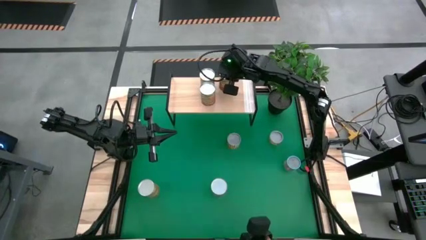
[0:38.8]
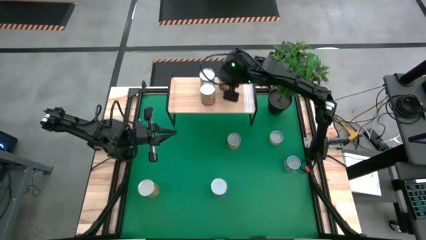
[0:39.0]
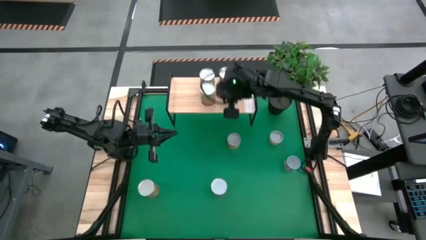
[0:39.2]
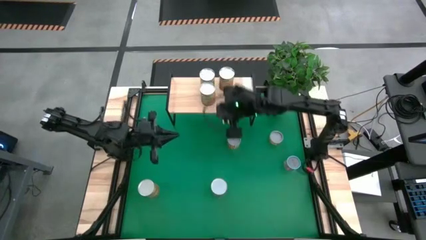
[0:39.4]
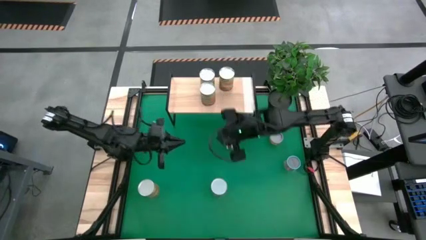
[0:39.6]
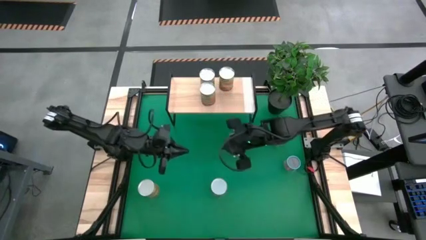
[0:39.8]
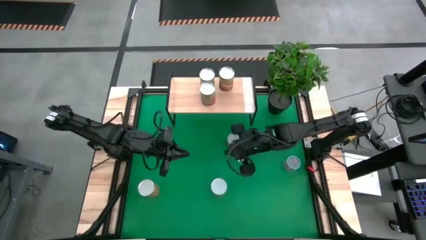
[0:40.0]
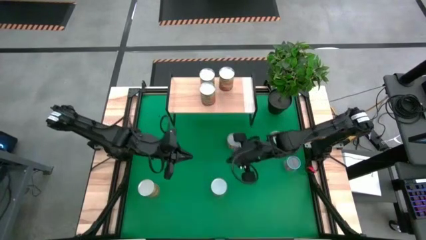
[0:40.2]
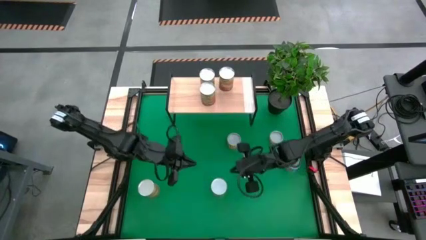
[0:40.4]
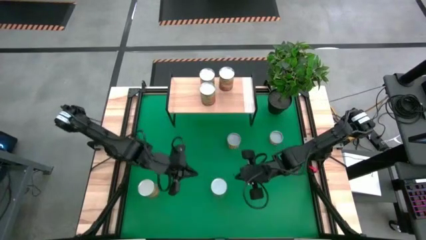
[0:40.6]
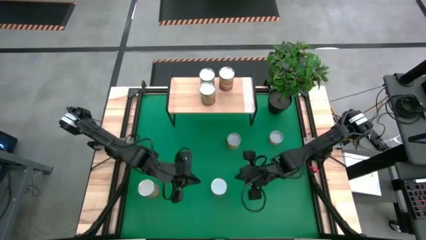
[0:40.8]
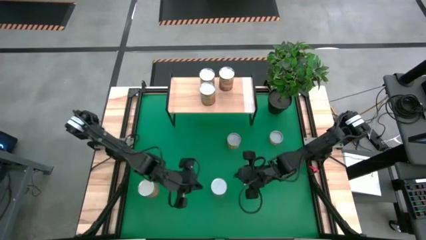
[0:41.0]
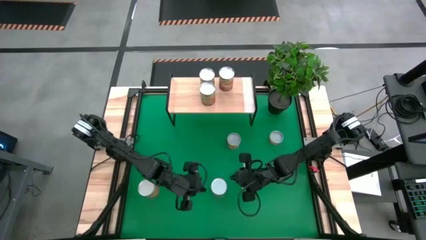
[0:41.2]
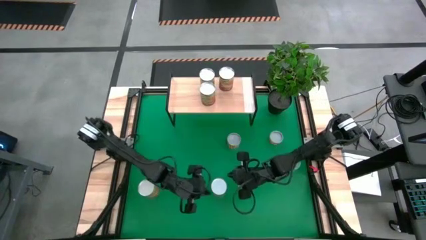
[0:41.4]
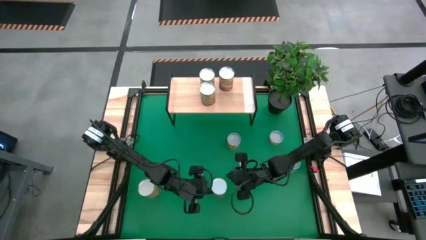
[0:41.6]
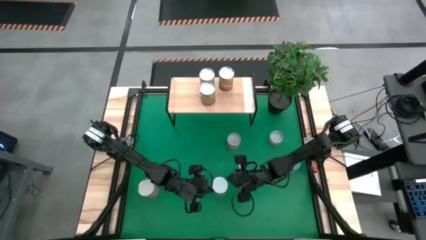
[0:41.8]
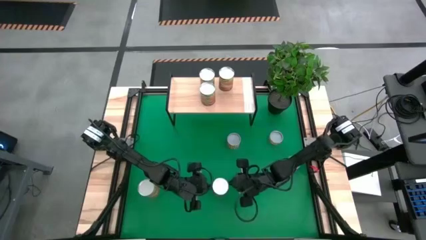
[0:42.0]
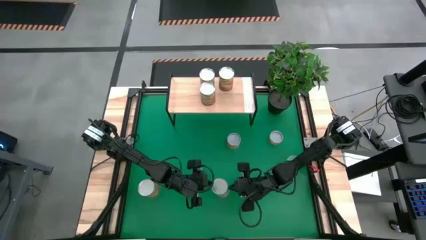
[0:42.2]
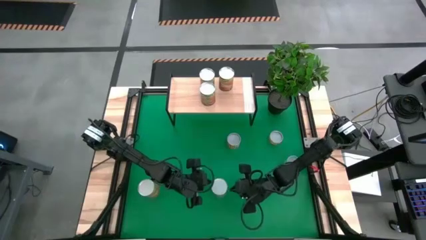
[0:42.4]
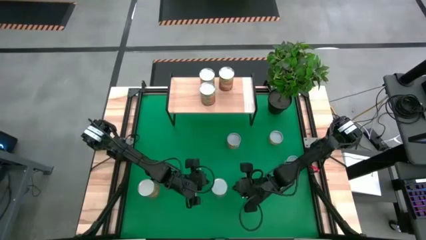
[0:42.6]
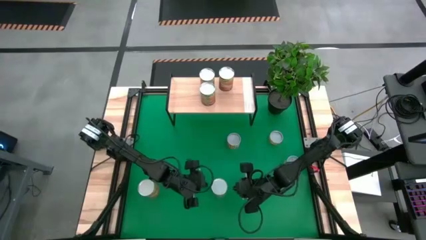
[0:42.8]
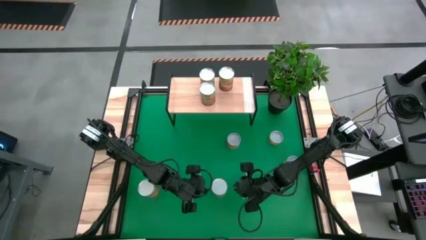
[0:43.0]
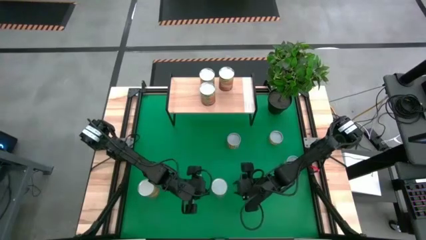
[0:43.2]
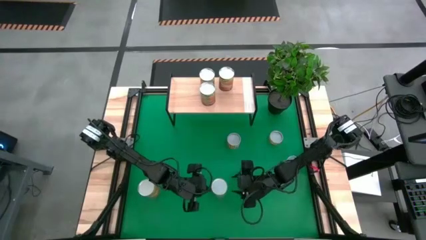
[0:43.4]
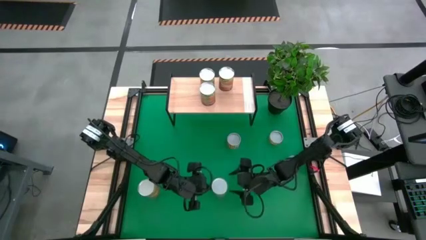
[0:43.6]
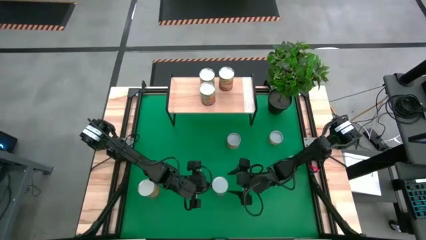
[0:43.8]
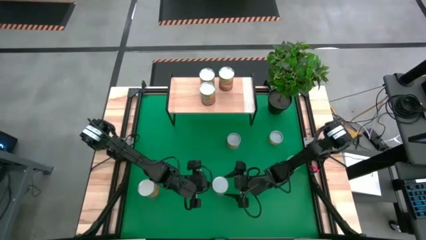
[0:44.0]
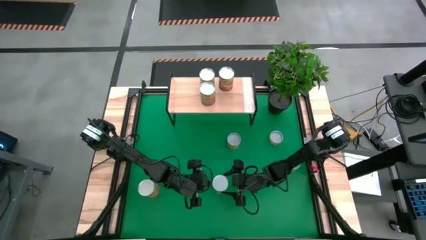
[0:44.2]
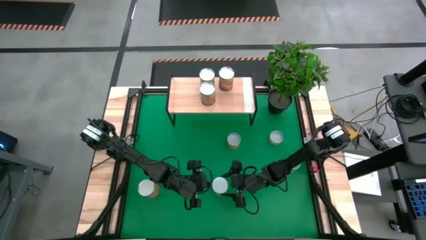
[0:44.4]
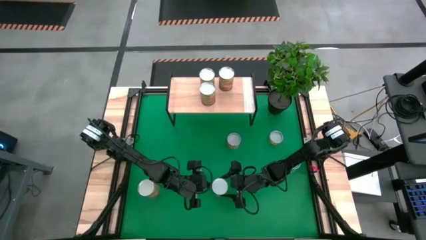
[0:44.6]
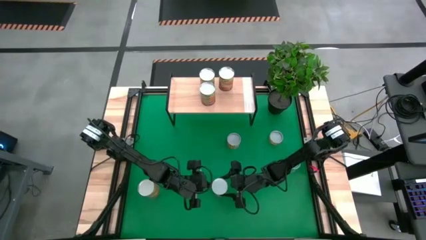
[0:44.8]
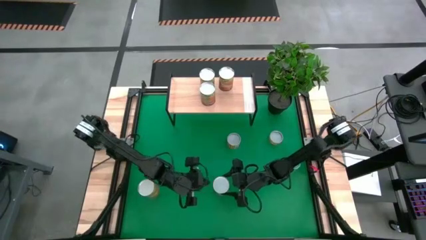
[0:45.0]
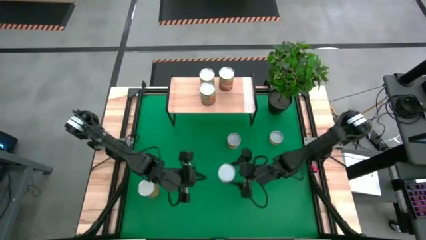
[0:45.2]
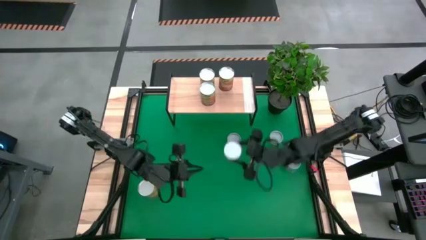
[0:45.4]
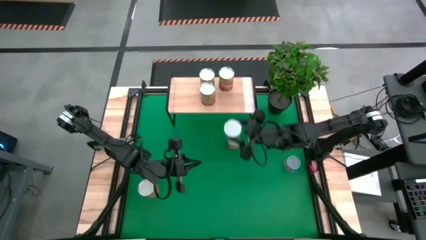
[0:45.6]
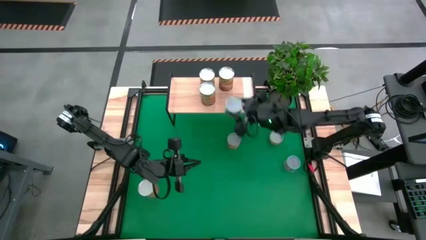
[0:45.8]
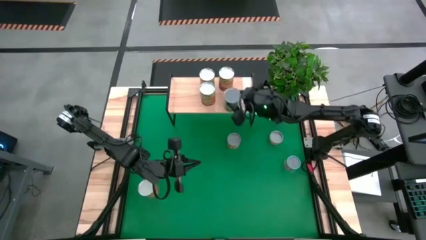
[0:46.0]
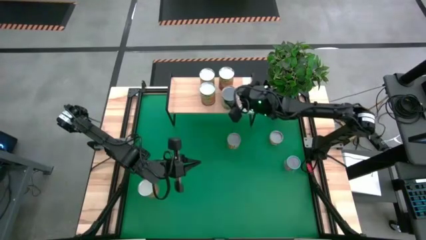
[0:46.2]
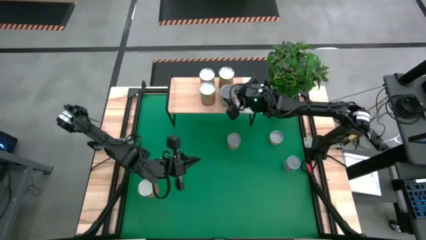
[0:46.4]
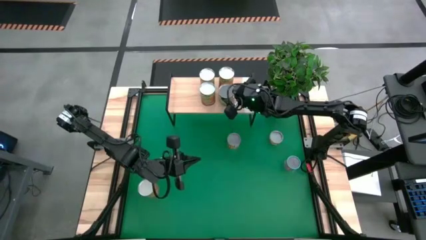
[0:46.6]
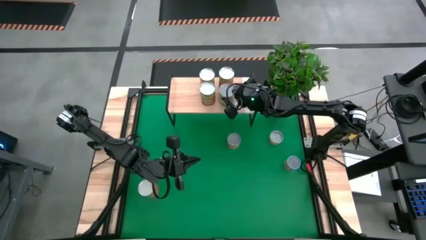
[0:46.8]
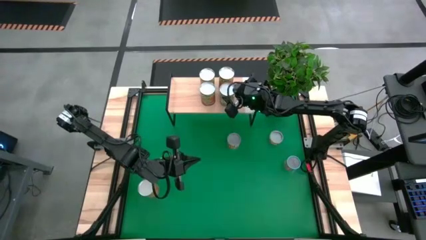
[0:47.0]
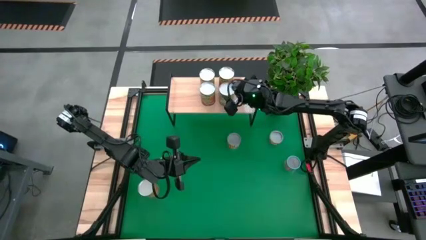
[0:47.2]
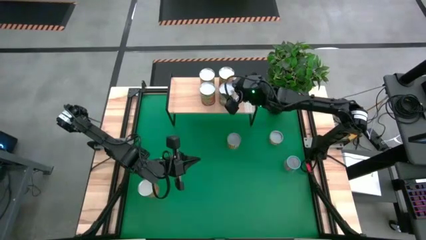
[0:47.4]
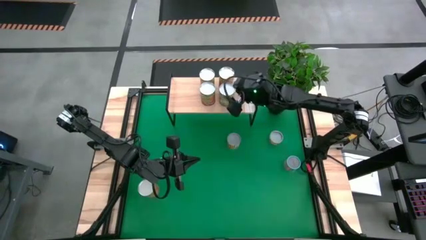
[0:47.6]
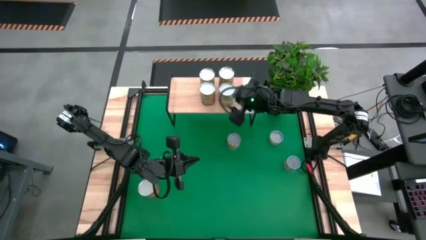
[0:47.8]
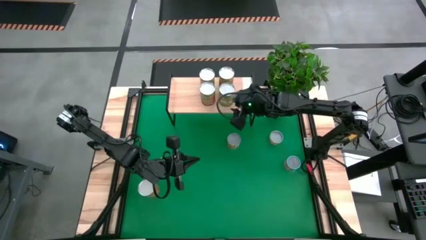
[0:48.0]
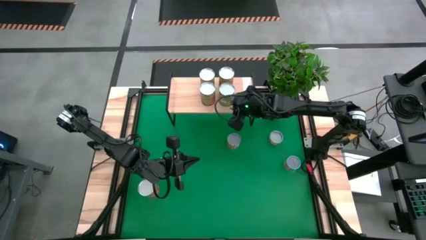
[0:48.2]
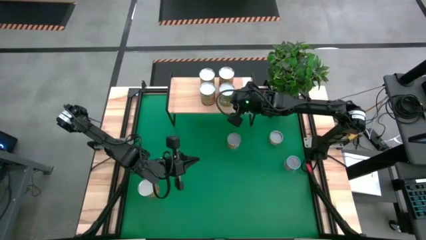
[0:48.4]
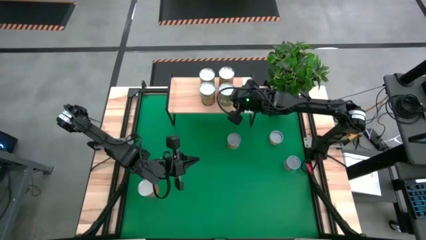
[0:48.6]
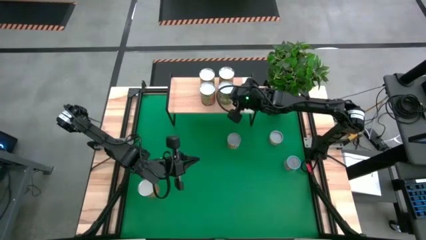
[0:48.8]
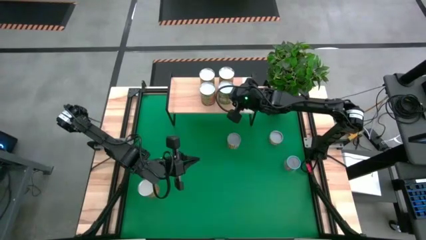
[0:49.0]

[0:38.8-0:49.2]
Task: Pick and place cans onto a shelf
Put the canned pears on the shelf

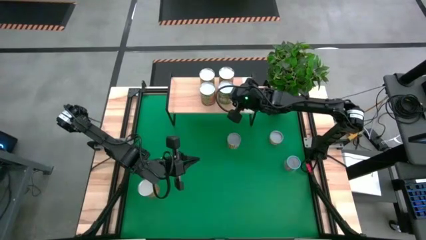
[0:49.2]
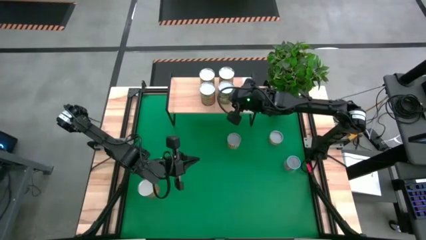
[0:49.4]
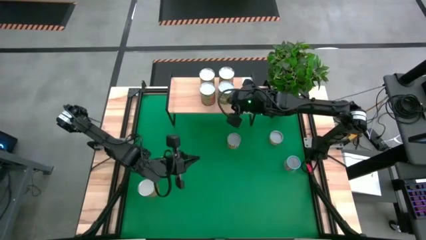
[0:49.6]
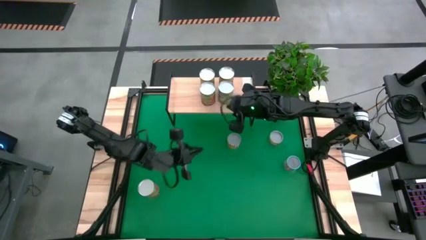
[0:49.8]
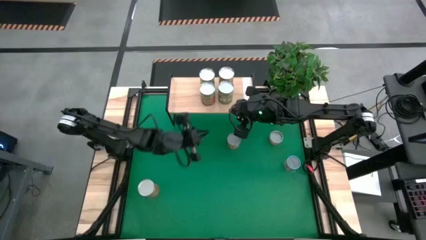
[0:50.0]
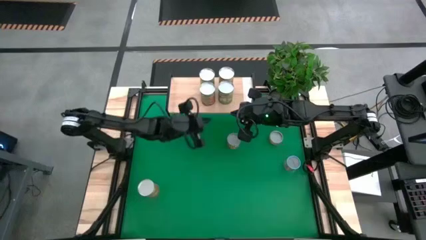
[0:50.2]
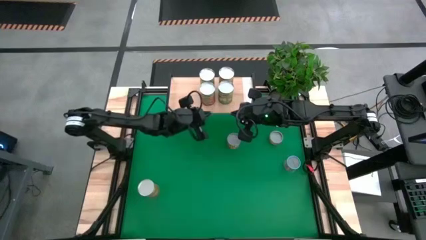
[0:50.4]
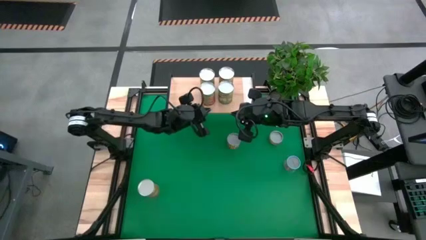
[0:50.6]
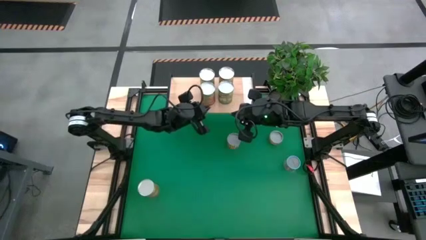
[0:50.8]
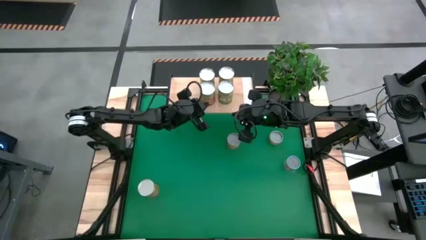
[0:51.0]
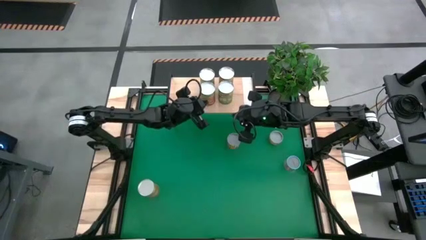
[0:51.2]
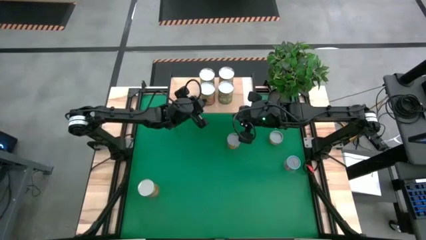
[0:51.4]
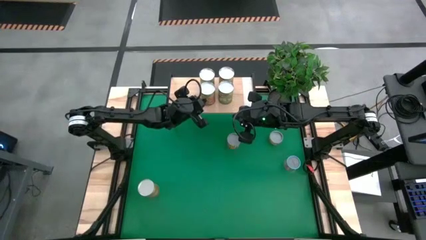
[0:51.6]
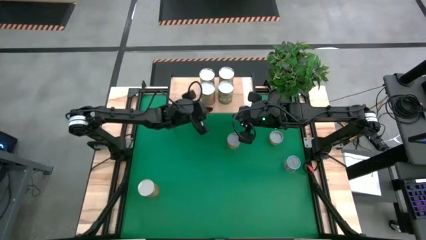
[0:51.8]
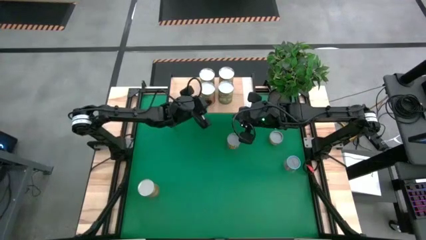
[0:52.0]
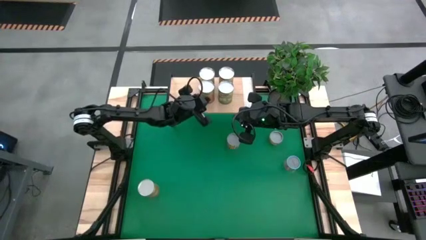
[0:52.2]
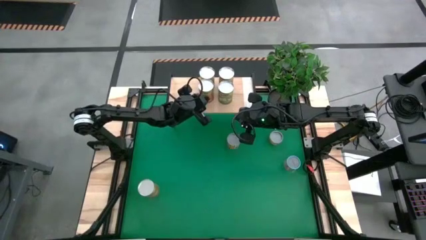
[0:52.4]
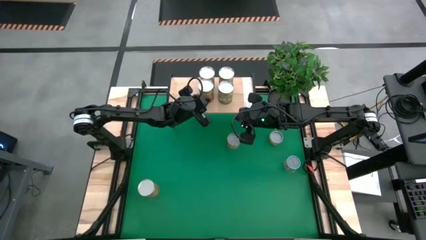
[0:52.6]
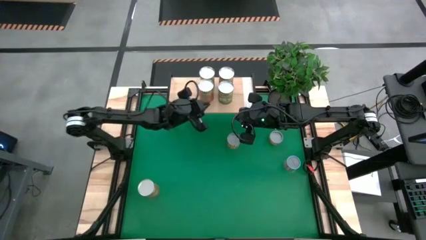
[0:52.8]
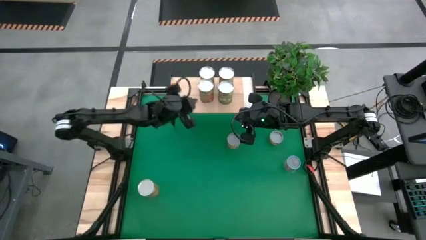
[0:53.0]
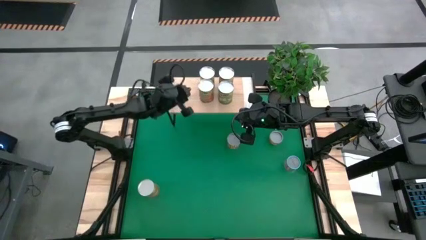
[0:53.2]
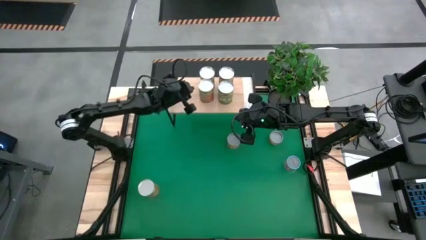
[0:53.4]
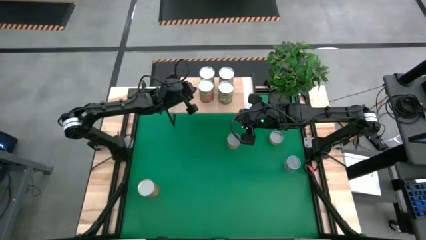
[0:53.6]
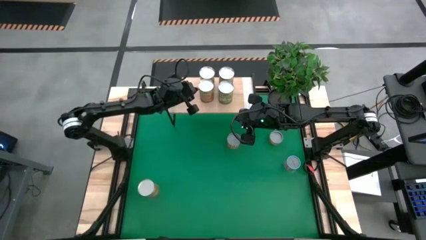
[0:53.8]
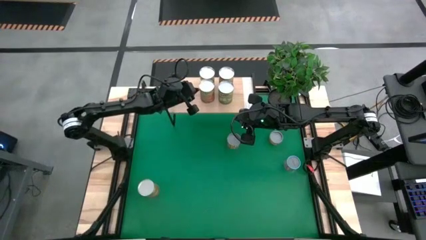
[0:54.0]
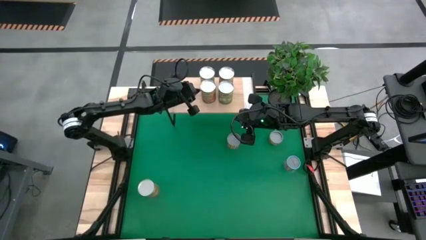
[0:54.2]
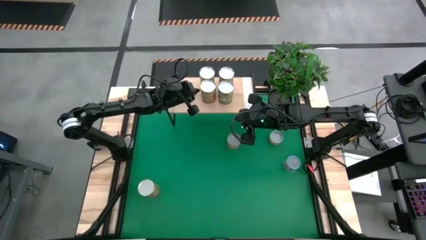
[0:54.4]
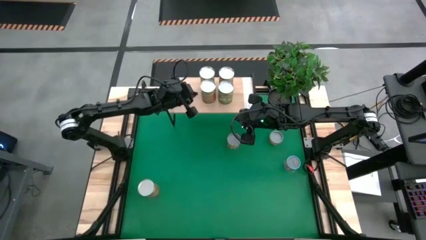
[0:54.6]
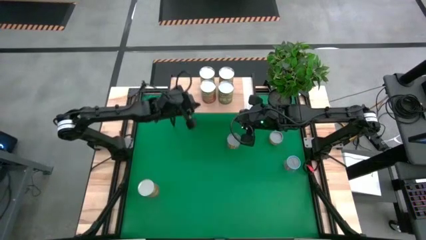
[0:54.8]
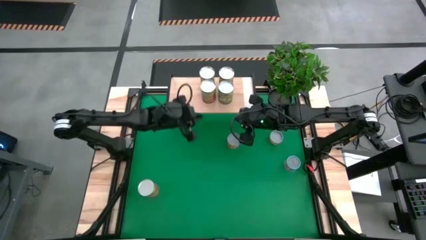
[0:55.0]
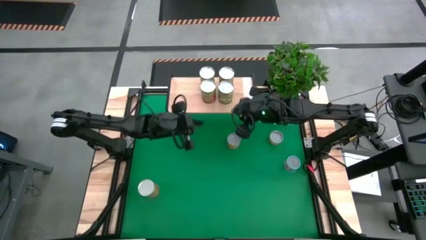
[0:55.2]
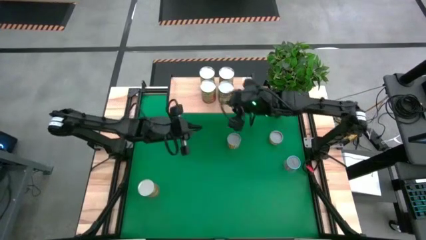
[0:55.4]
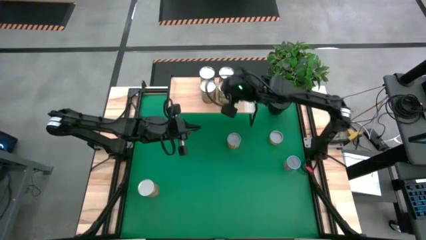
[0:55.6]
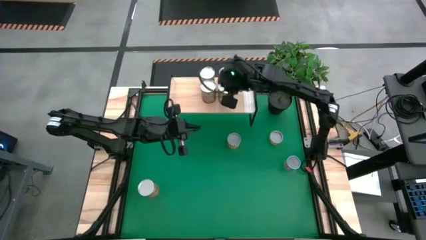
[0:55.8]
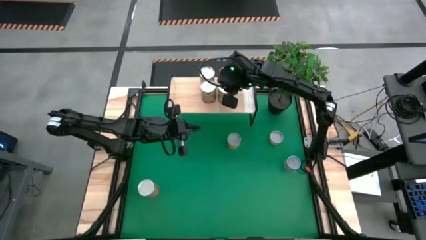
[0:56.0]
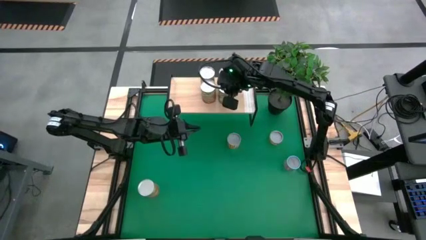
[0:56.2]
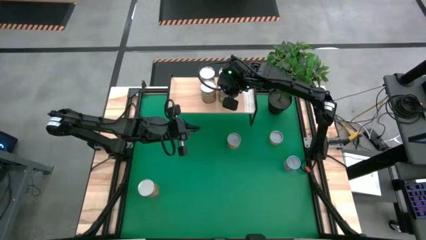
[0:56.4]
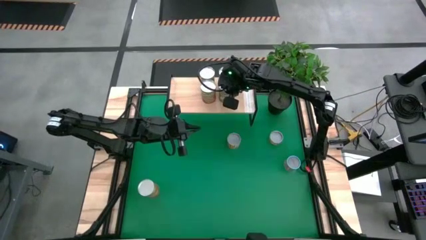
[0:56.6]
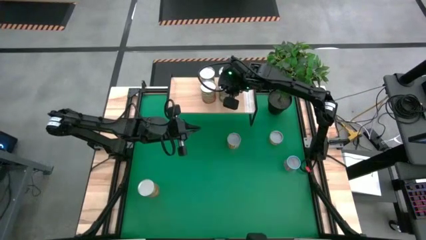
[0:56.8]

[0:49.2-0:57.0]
Adjust the canned goods on the shelf
